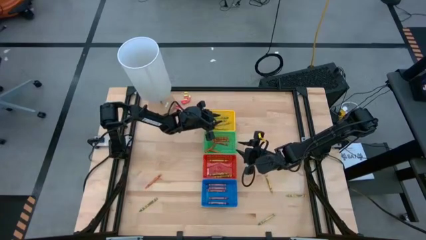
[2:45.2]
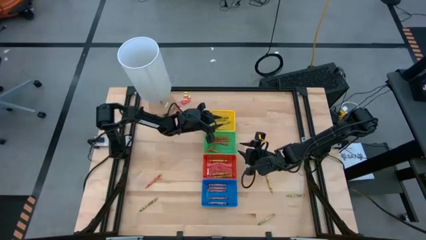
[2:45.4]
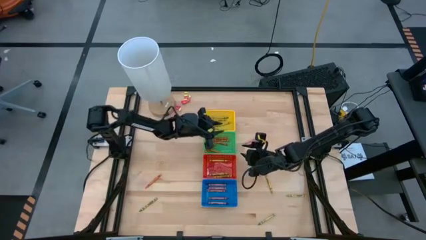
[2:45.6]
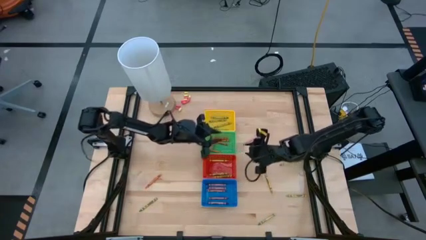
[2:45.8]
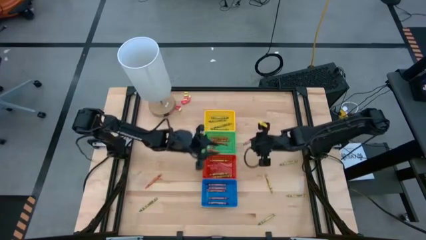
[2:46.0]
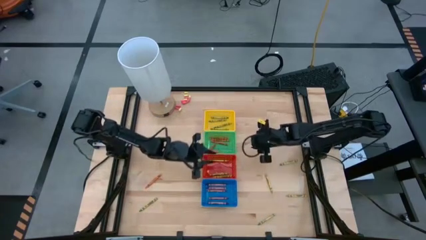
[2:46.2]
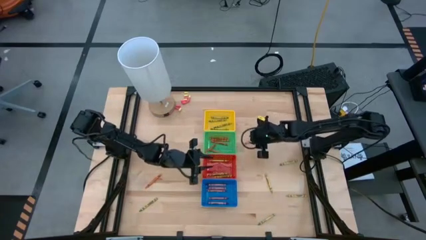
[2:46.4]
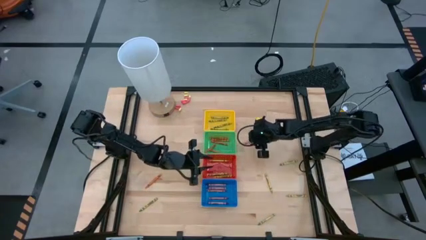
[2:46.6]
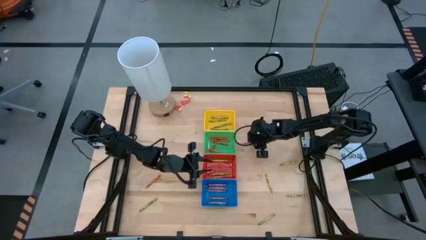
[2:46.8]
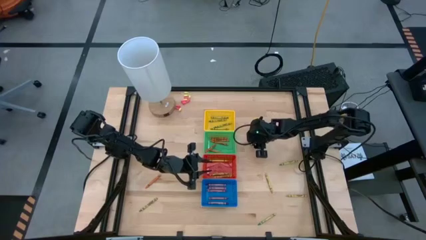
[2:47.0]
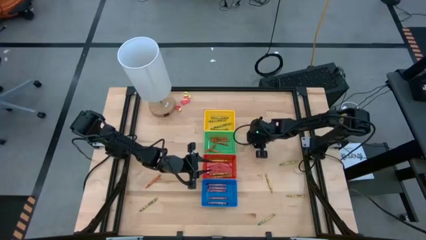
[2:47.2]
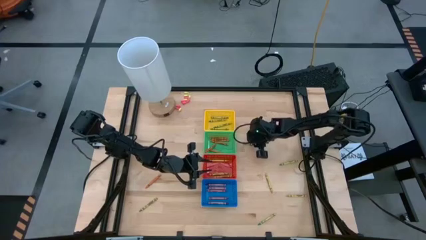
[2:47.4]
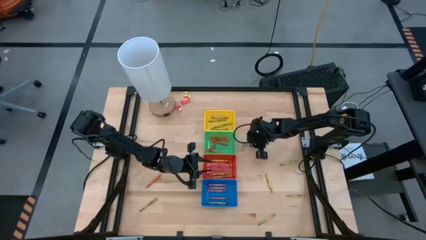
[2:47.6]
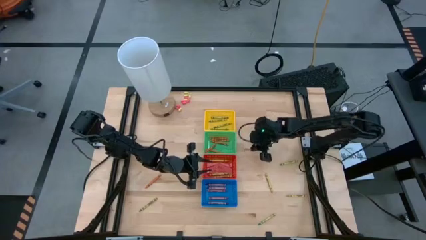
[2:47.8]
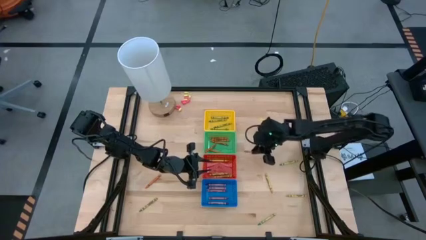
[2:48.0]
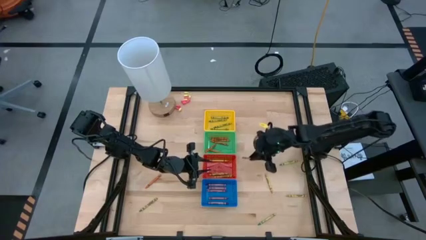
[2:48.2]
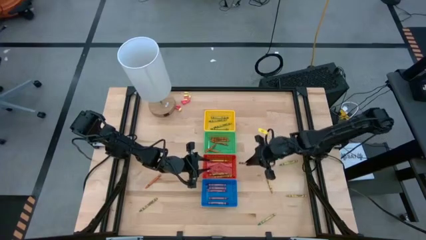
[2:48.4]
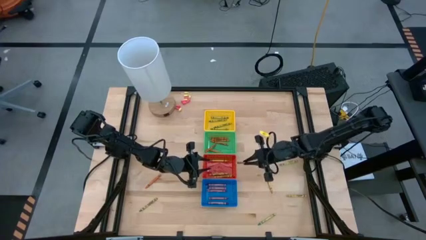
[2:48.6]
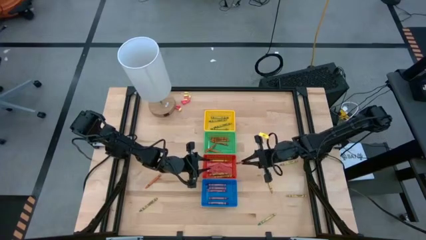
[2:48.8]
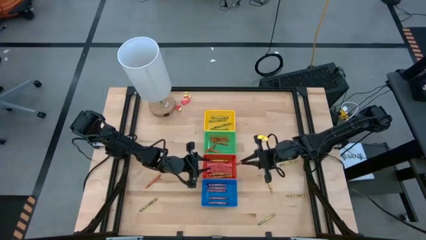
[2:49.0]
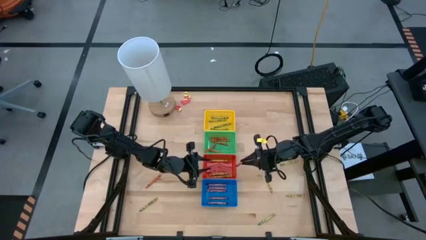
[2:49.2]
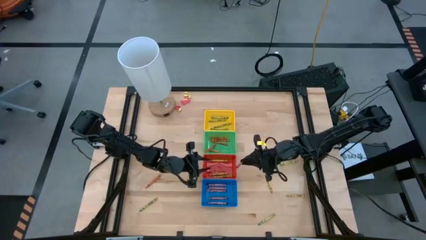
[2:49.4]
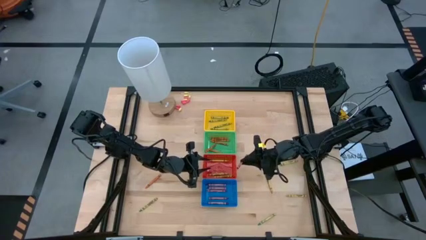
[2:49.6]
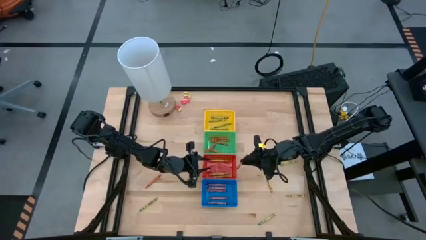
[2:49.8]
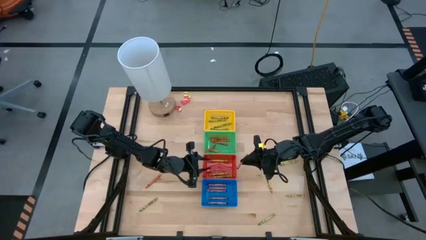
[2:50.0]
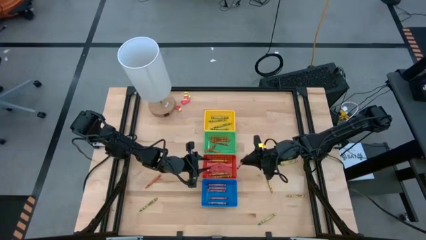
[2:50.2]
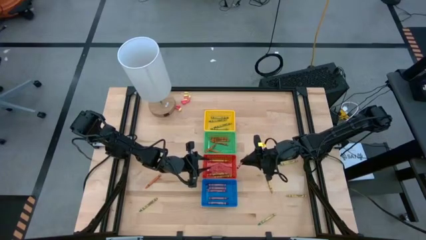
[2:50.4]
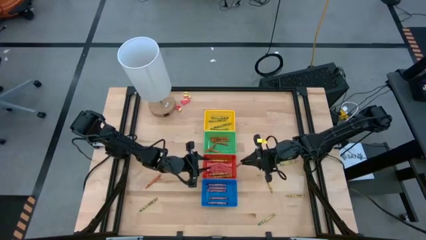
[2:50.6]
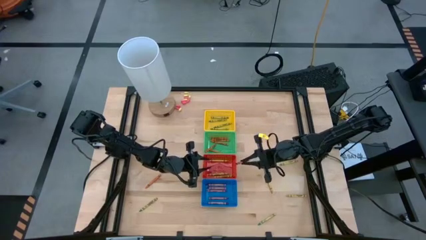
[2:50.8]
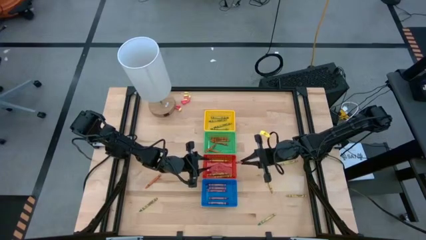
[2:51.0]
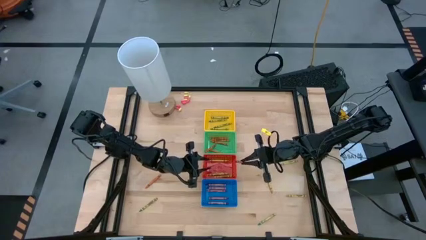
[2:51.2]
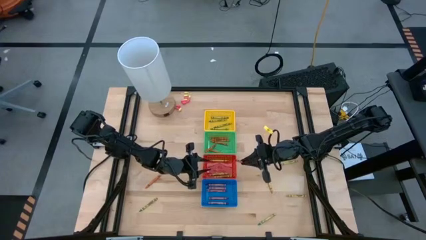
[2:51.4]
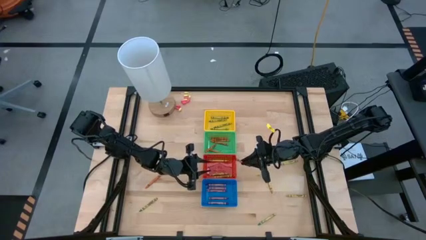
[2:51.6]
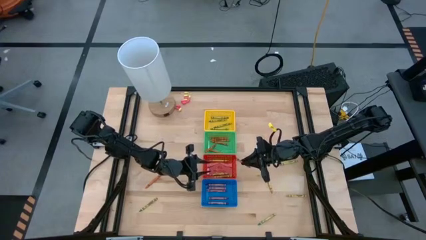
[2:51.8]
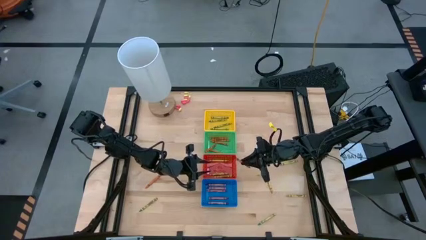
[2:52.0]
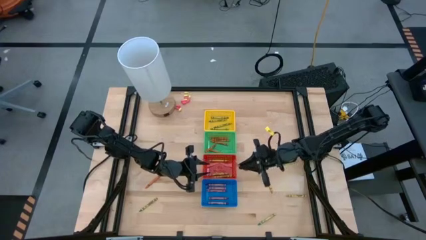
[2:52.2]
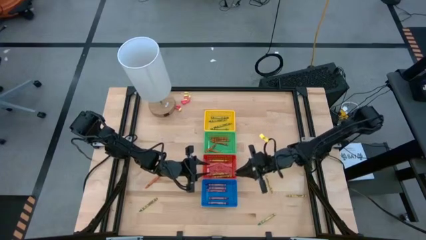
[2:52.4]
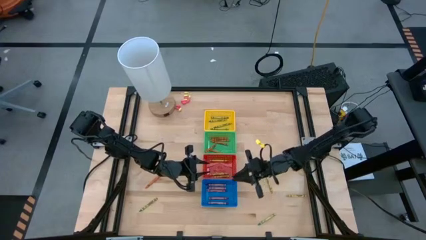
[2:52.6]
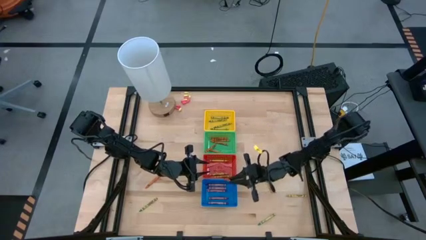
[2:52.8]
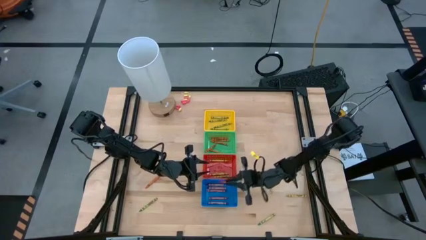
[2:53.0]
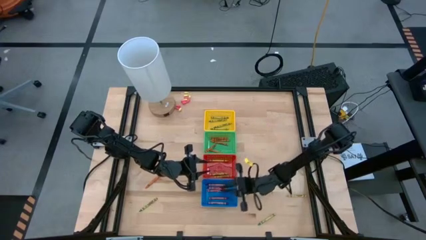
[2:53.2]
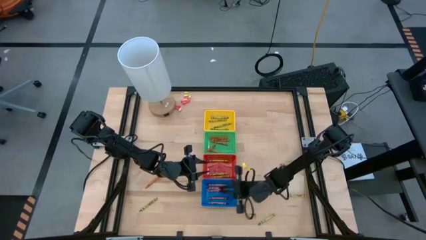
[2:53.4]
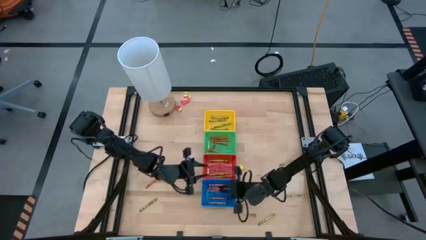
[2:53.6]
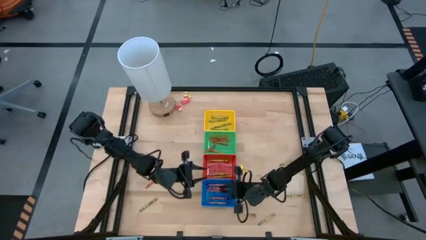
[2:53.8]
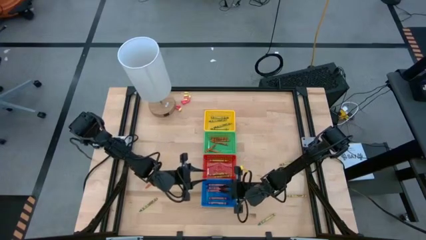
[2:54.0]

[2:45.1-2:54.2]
Task: Sort crayons
Put the red crayon into the blue bin

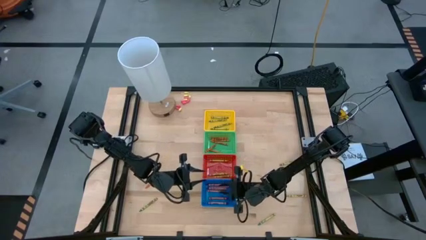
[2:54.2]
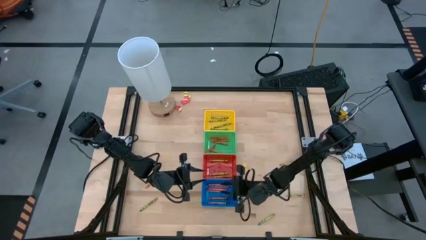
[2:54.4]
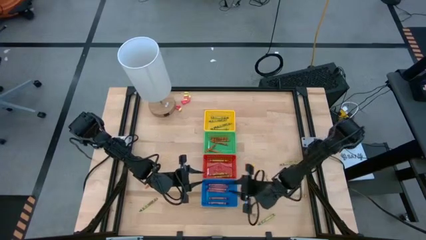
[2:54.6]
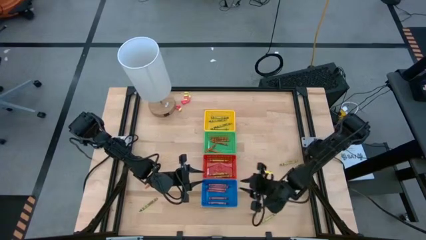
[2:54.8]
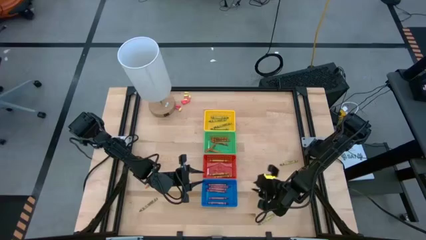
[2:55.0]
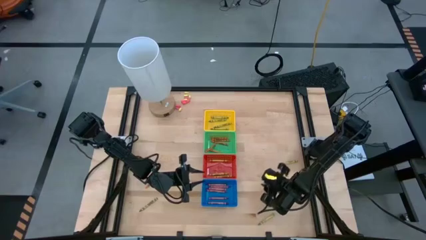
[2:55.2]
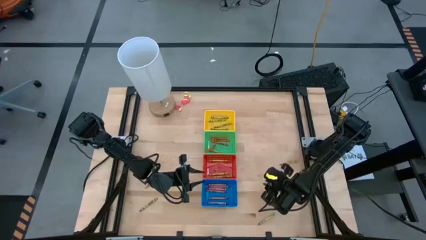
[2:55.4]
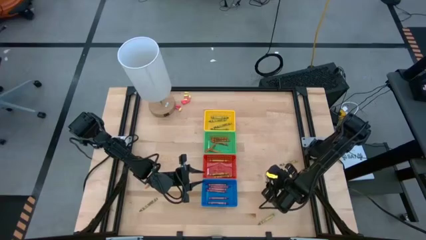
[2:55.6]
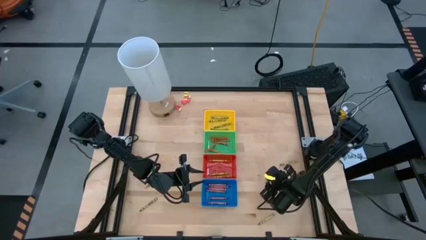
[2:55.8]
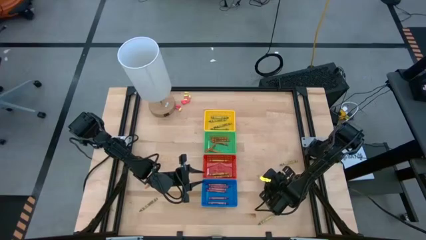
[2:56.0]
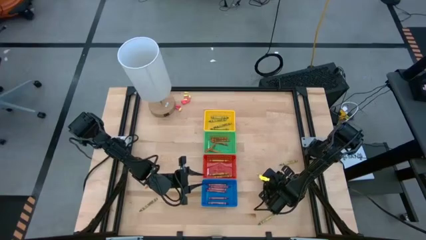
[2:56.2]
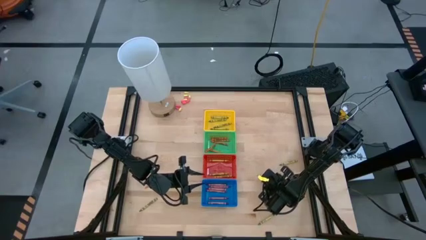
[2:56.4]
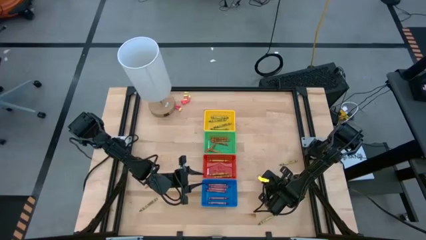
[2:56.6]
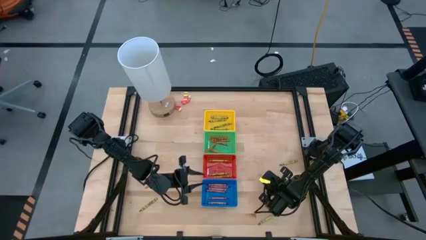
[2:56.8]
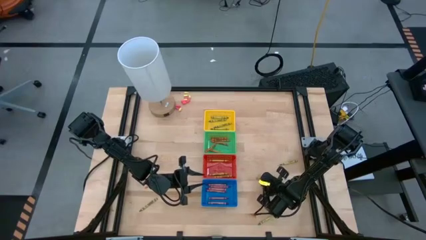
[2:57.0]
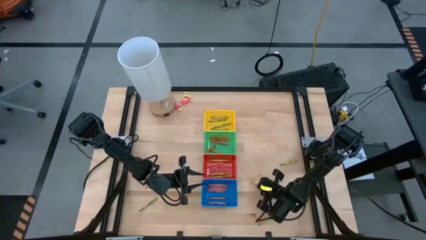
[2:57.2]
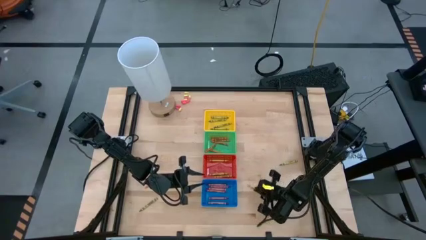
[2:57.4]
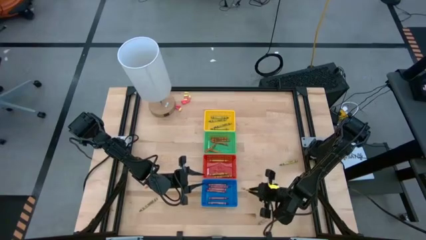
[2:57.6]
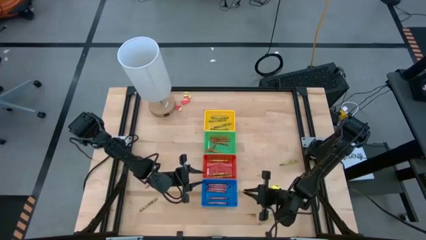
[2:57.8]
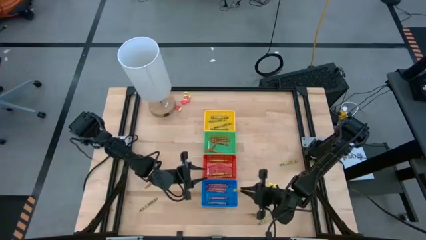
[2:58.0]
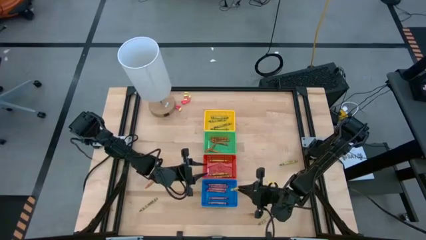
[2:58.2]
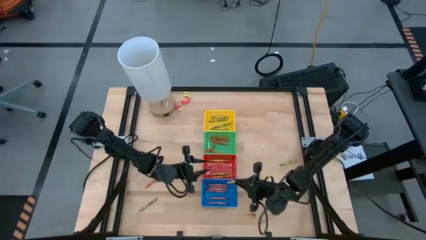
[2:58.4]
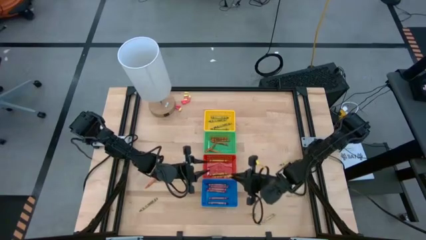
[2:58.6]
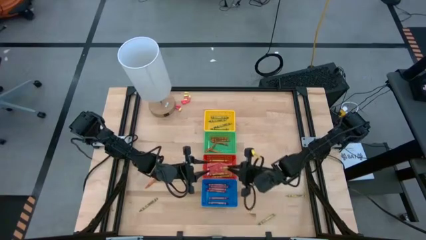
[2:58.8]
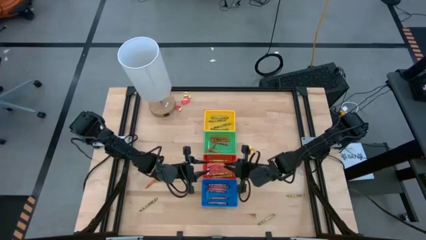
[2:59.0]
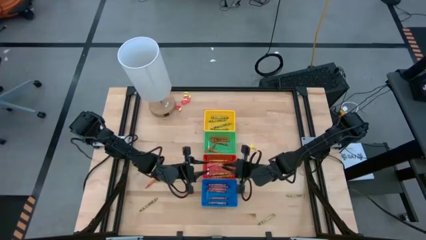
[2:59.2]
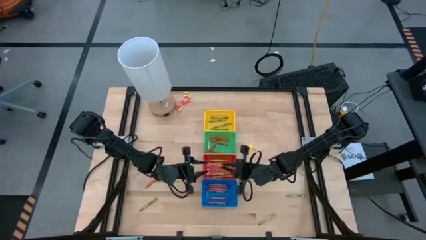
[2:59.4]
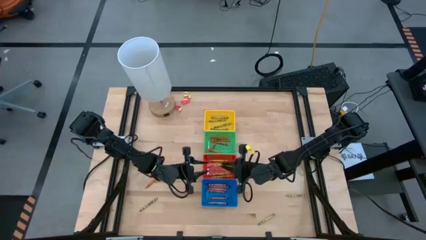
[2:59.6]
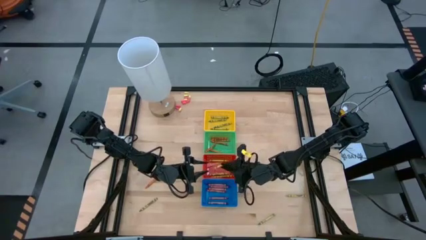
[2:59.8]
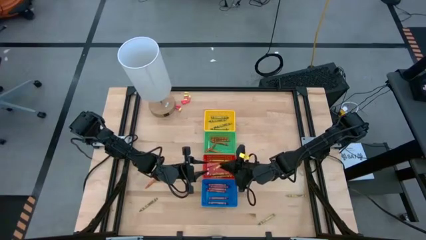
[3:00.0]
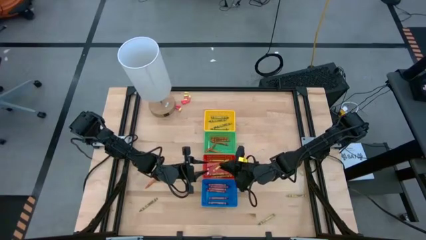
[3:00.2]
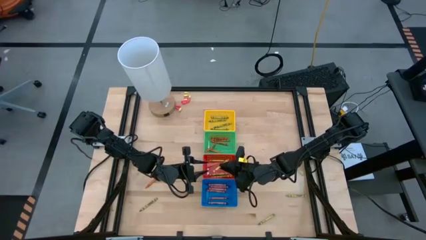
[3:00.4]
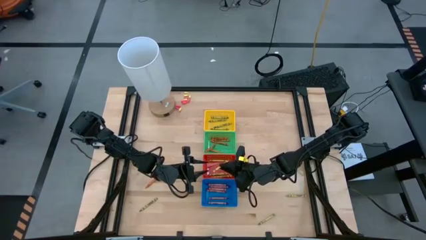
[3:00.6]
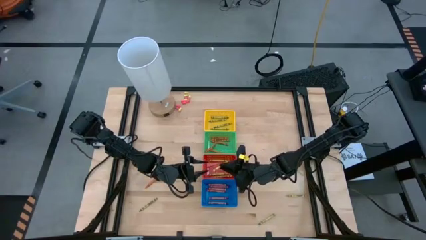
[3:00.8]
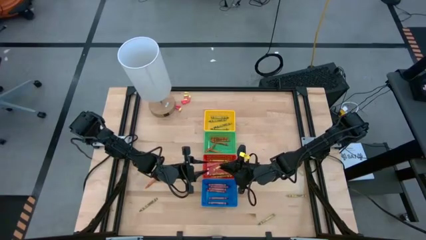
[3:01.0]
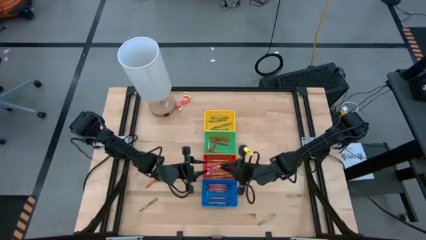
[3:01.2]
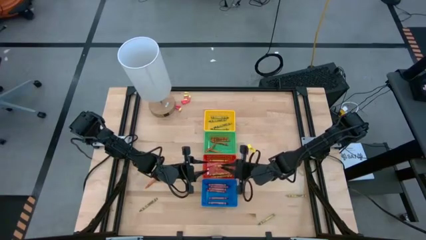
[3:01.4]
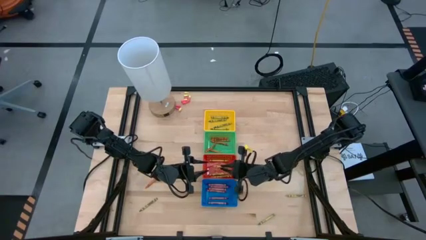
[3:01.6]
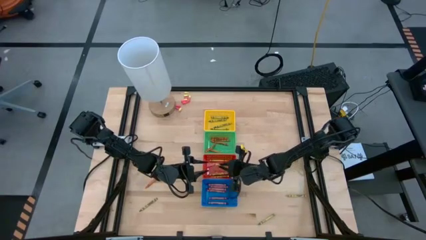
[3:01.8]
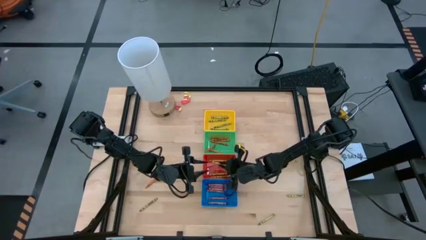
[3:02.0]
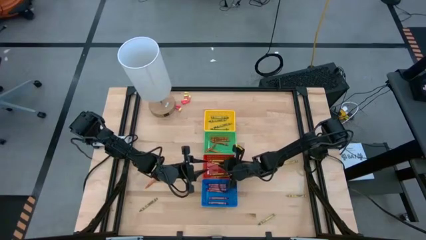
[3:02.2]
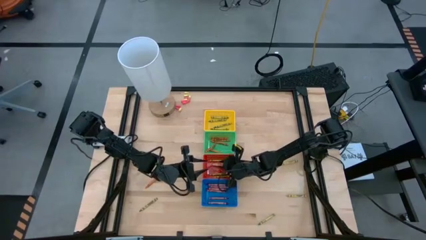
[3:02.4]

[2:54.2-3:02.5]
Put the yellow crayon into the red bin
